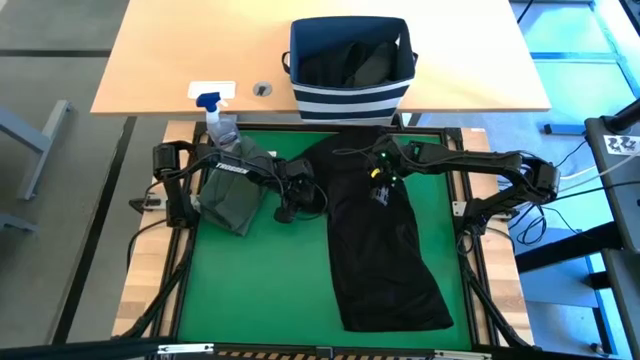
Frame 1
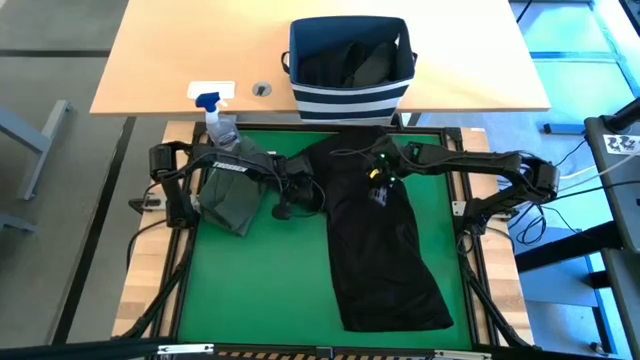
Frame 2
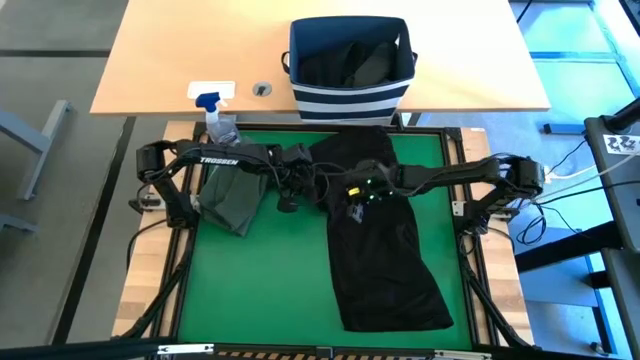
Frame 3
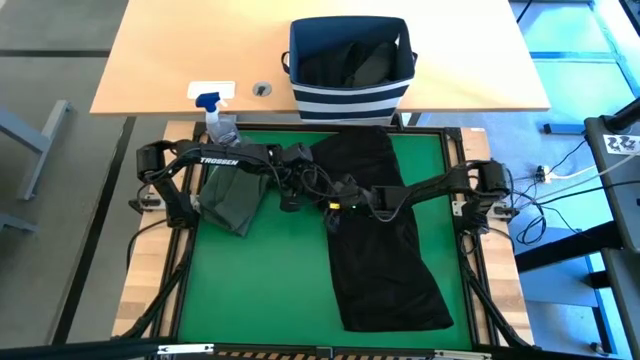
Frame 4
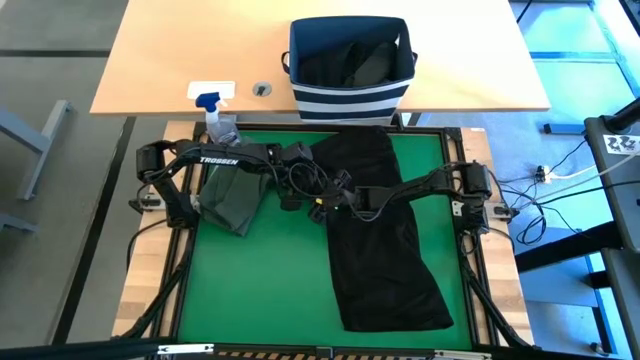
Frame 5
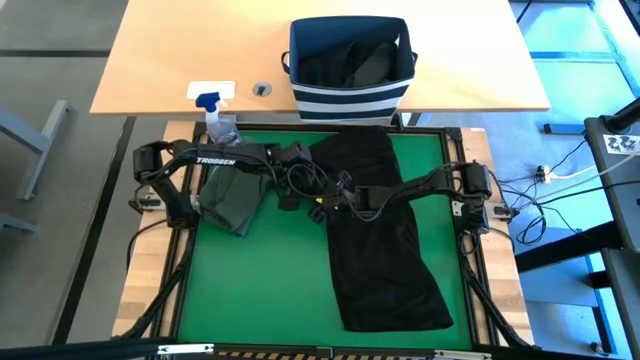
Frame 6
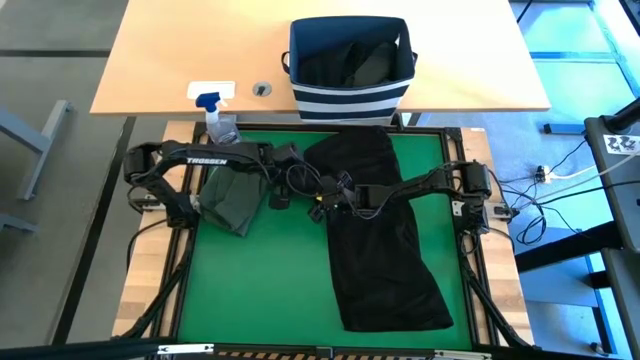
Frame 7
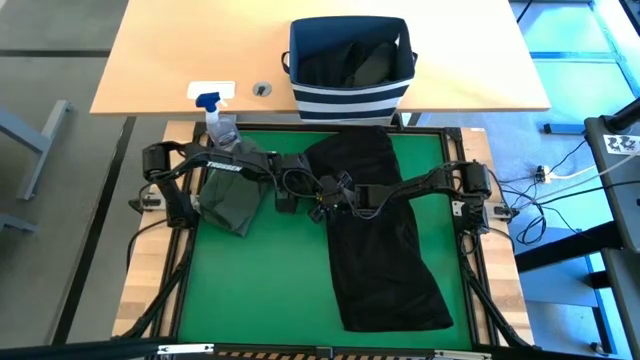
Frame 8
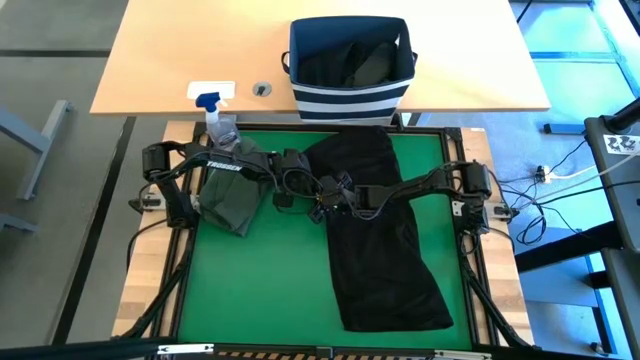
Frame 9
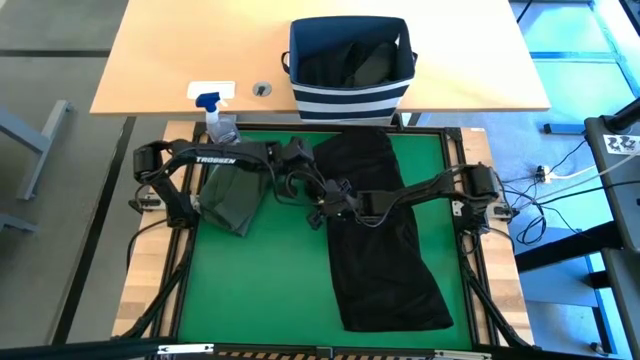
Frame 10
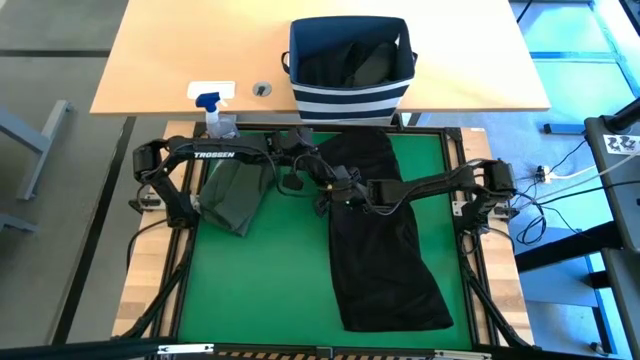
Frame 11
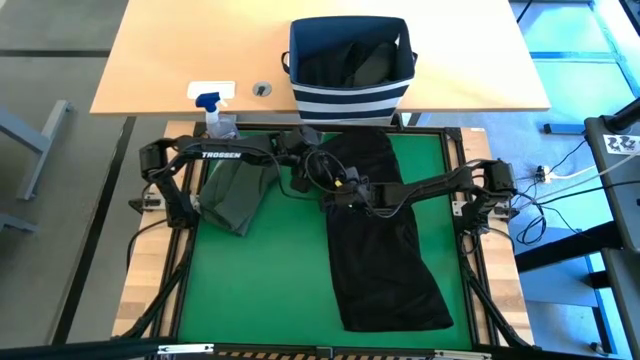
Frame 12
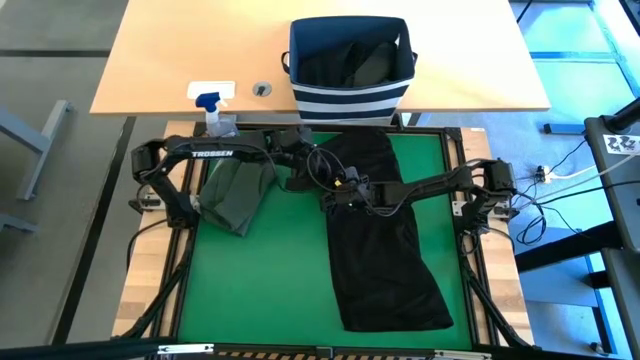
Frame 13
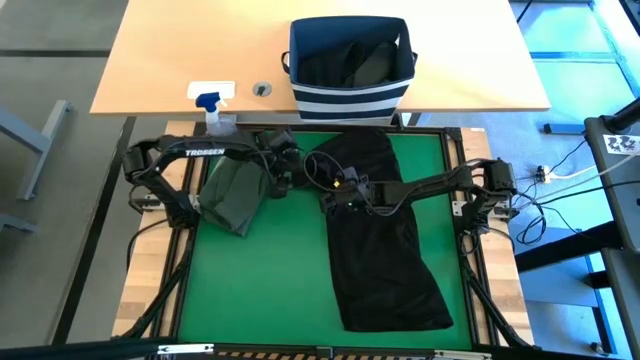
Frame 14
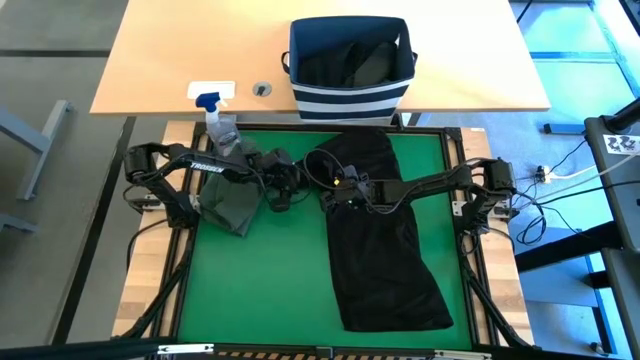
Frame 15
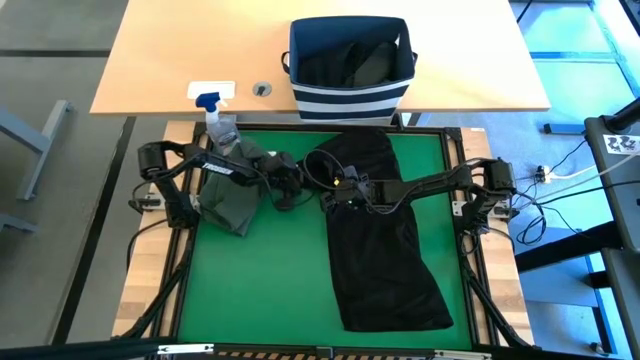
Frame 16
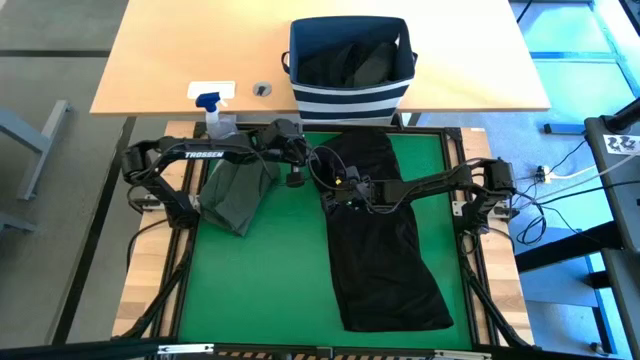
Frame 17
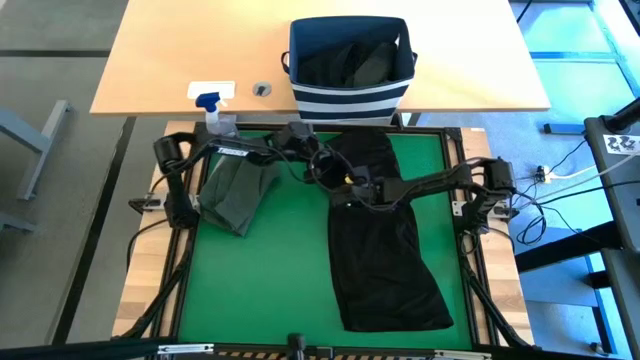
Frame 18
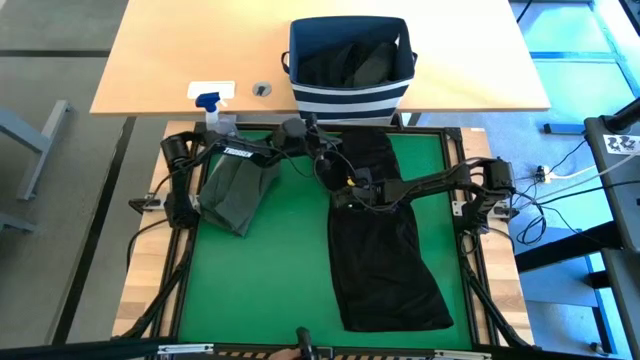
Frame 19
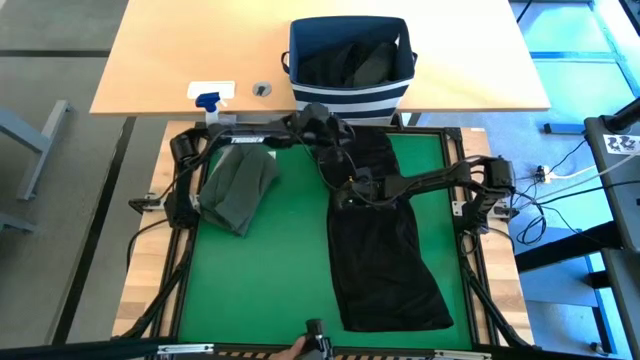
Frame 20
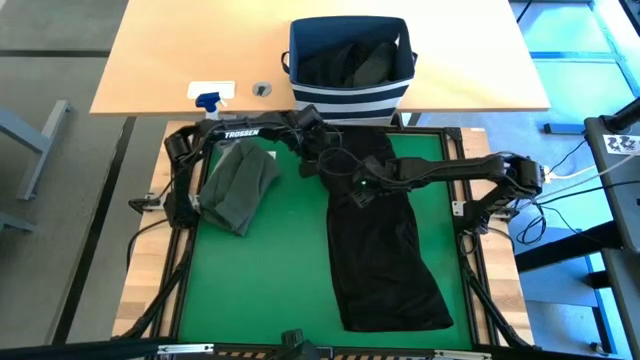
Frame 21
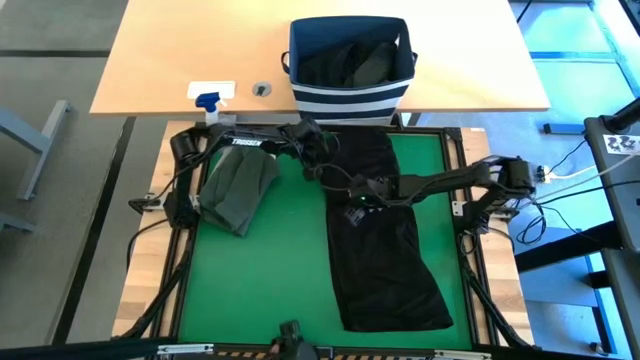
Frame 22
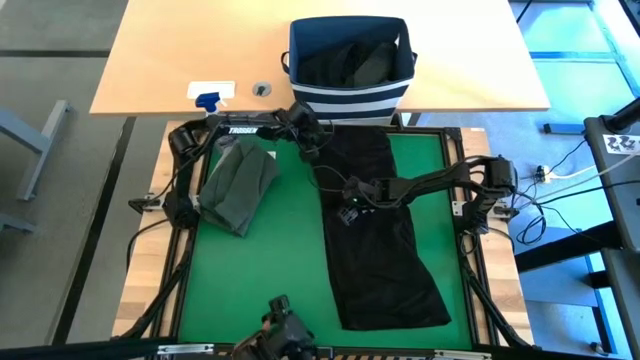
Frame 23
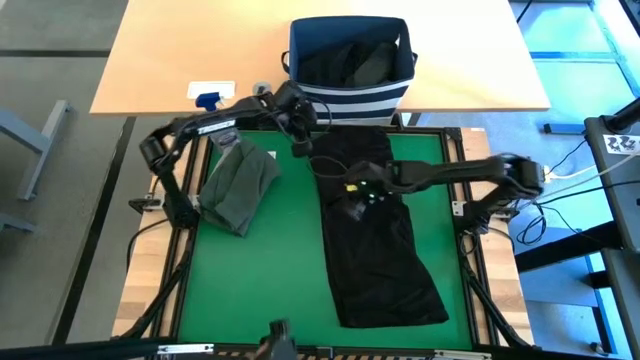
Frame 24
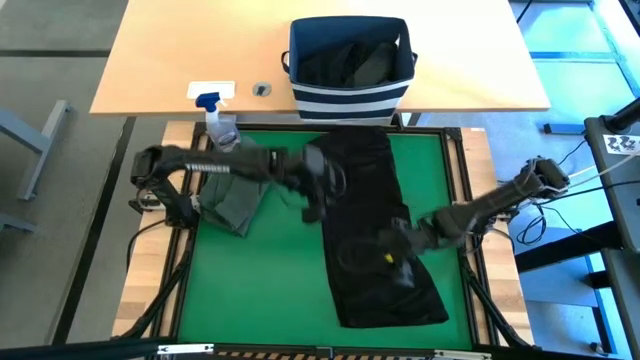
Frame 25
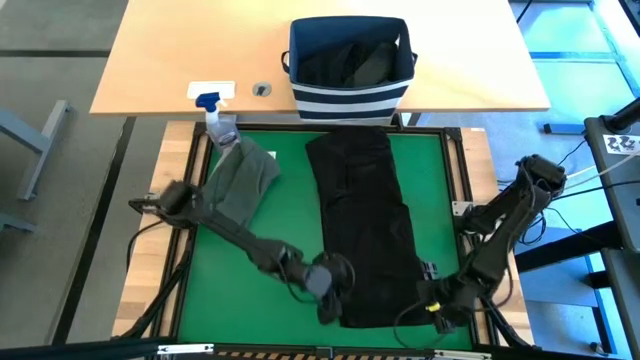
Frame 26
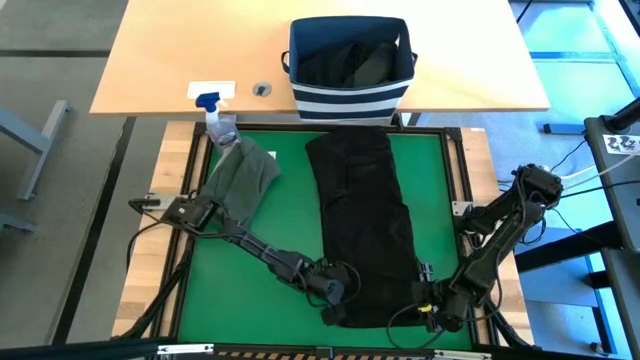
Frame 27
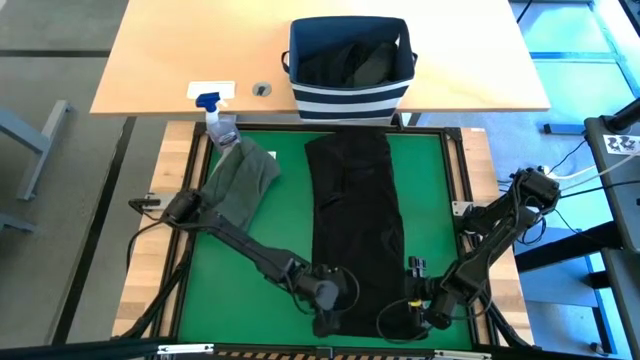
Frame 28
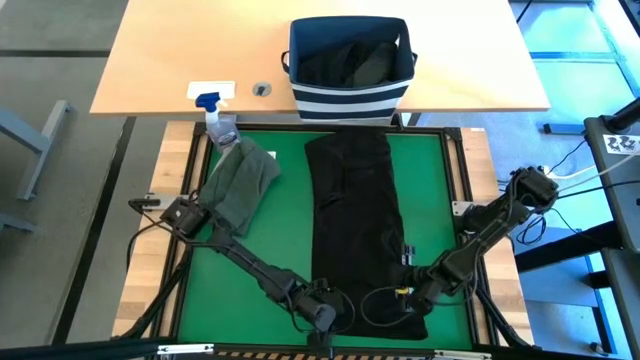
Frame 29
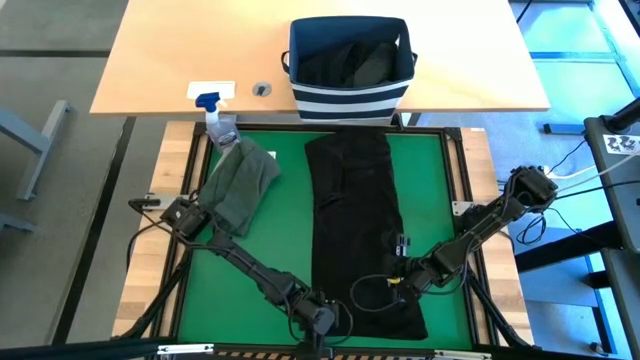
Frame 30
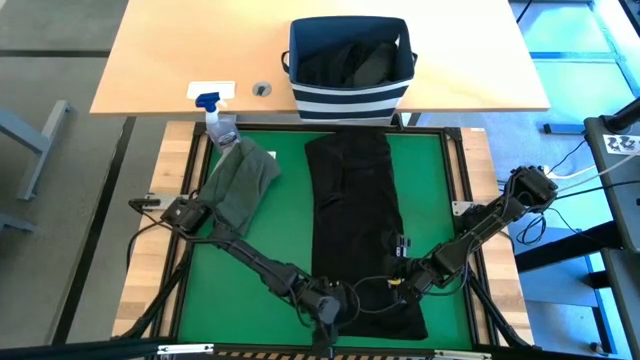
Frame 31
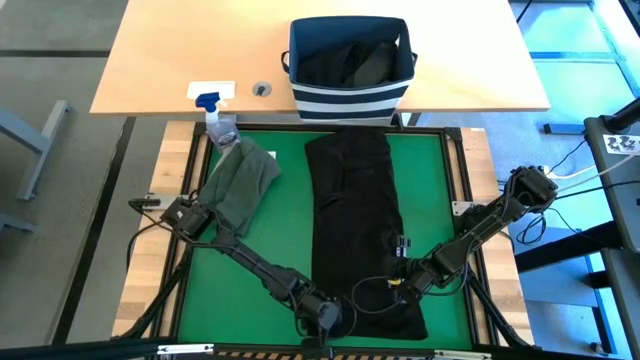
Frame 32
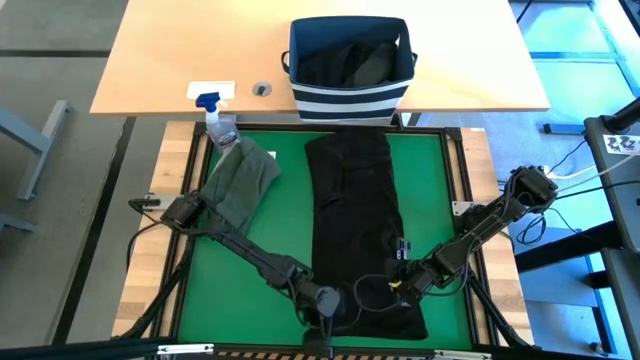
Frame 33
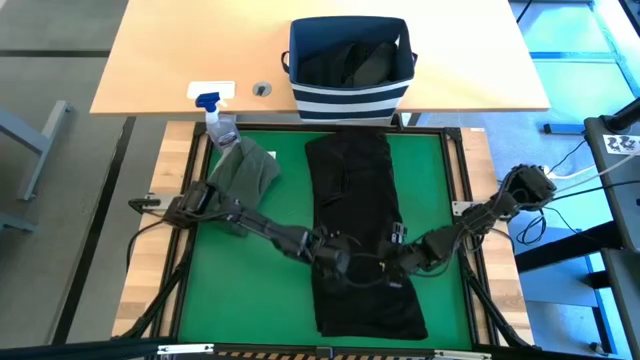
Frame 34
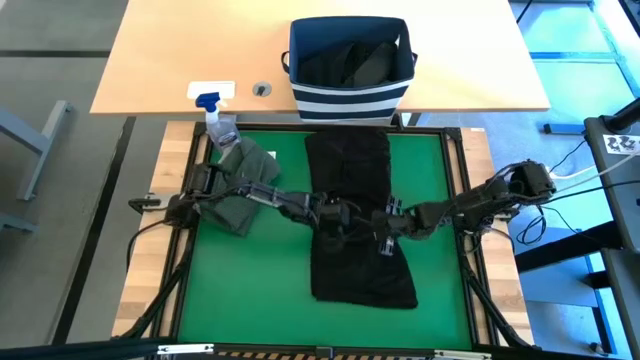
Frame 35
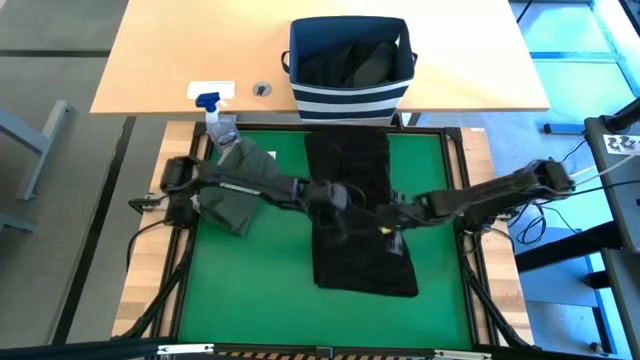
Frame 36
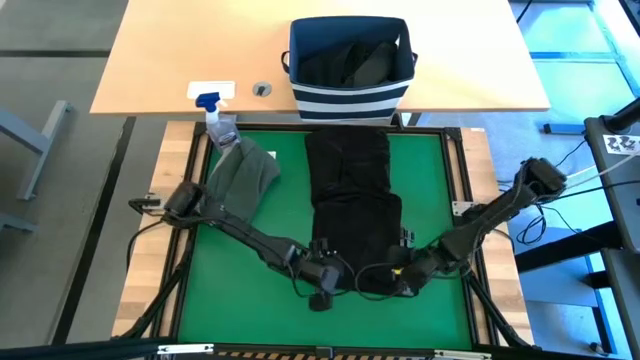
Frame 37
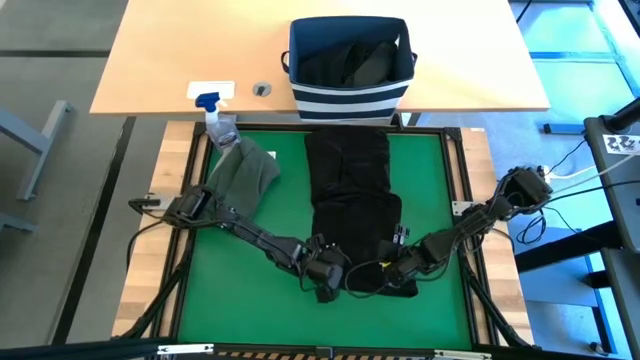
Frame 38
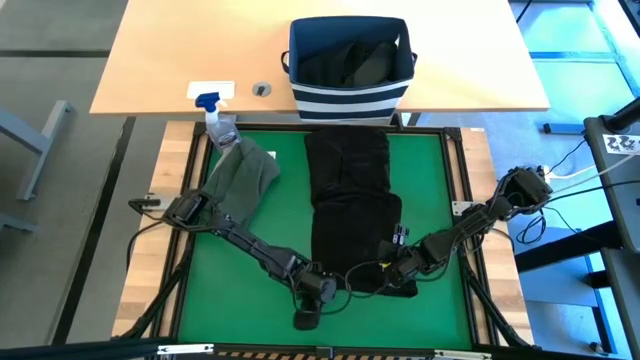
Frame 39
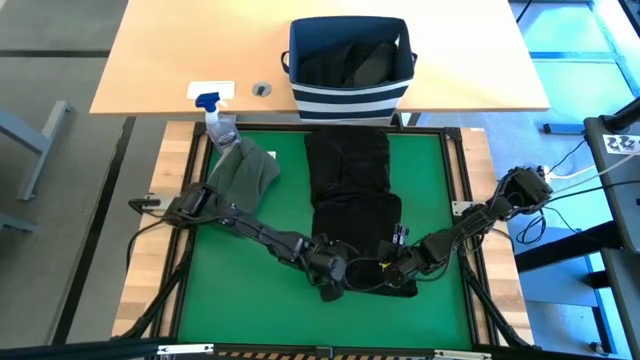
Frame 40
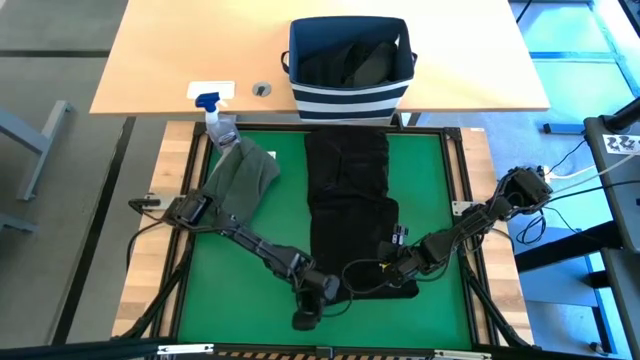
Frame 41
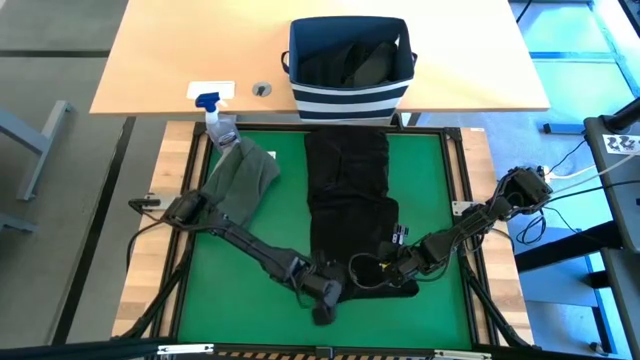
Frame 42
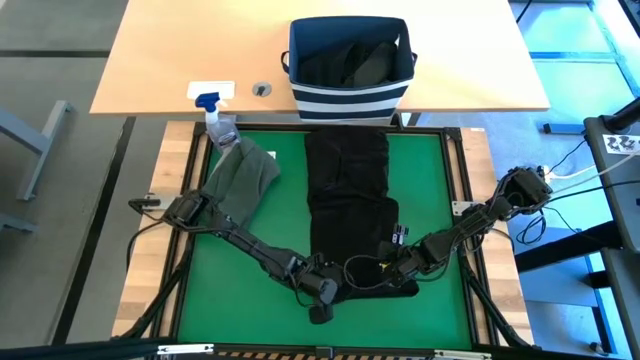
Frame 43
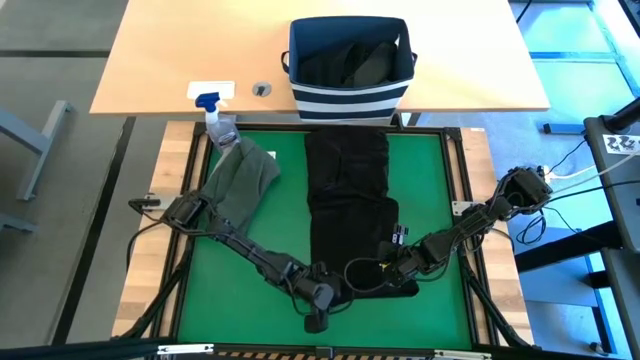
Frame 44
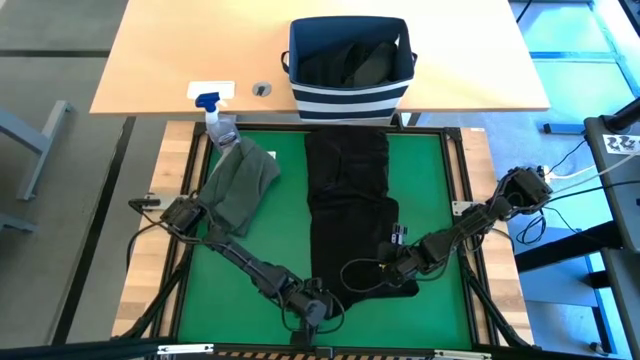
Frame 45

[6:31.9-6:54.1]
Task: Fold Laundry from Bin
Fold the black shirt
